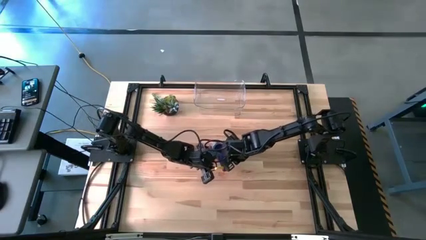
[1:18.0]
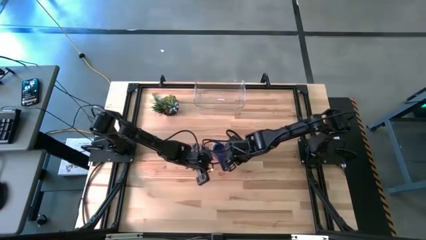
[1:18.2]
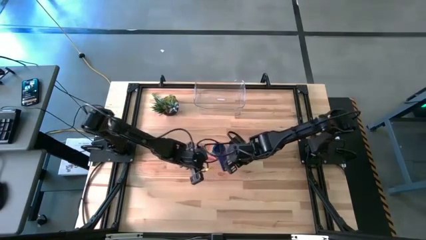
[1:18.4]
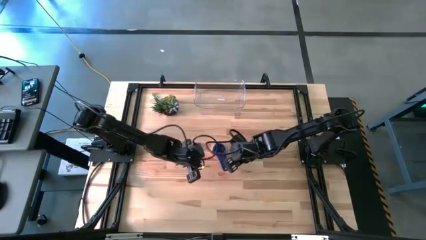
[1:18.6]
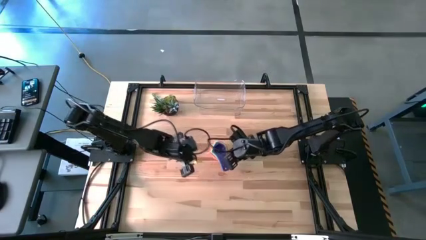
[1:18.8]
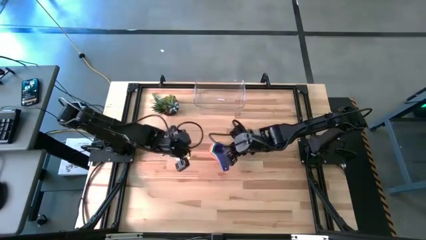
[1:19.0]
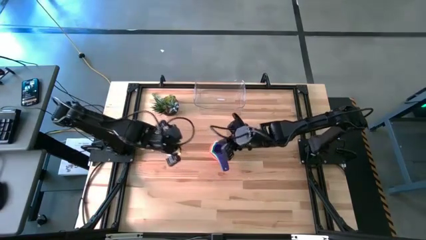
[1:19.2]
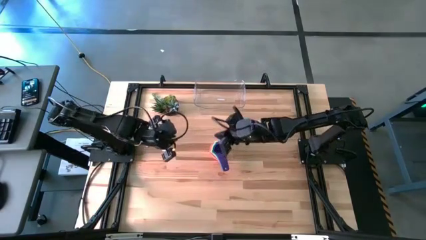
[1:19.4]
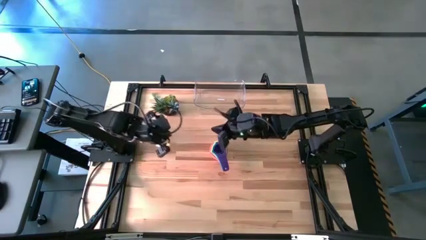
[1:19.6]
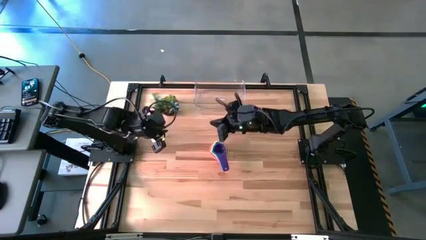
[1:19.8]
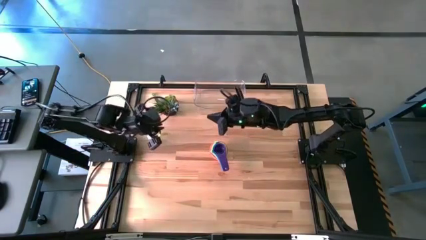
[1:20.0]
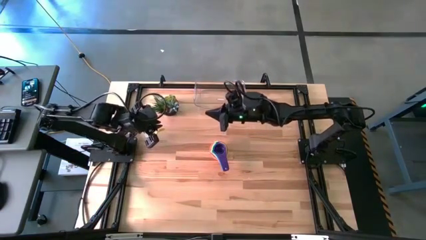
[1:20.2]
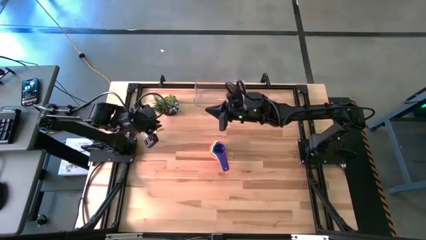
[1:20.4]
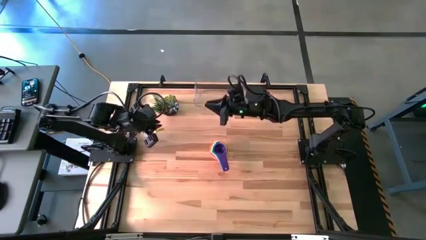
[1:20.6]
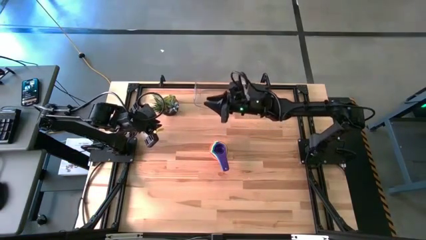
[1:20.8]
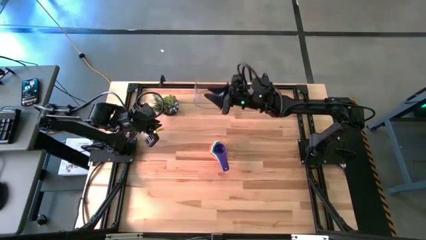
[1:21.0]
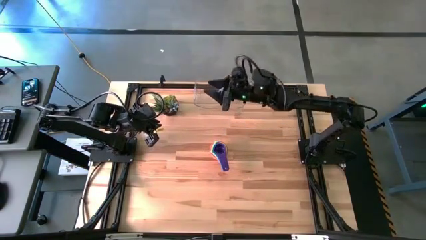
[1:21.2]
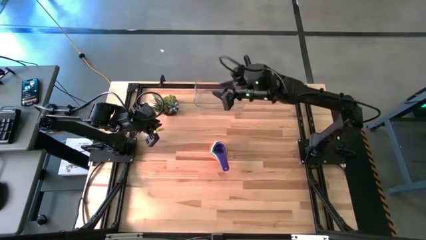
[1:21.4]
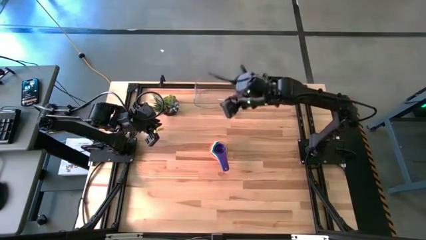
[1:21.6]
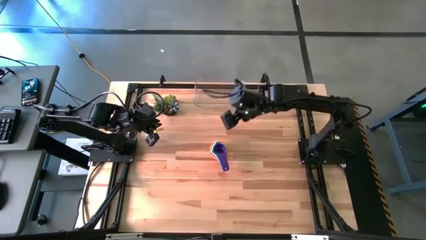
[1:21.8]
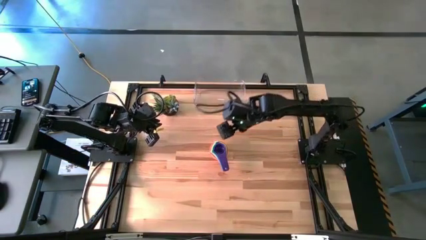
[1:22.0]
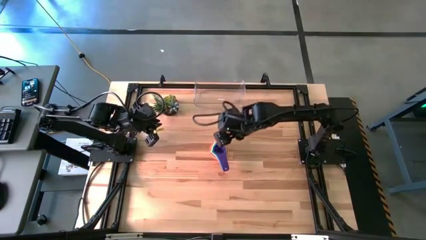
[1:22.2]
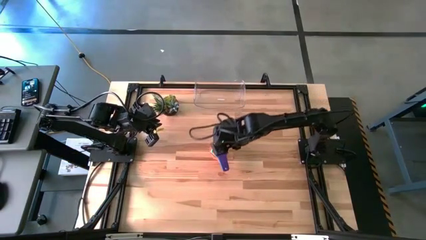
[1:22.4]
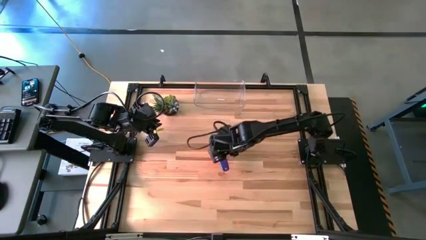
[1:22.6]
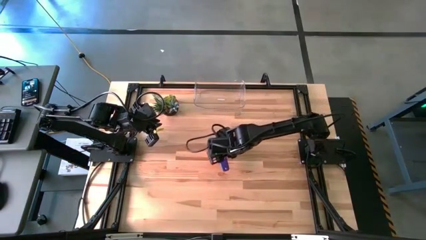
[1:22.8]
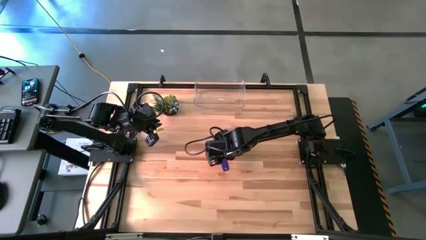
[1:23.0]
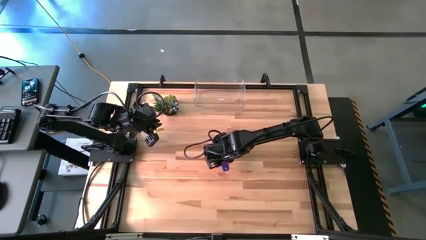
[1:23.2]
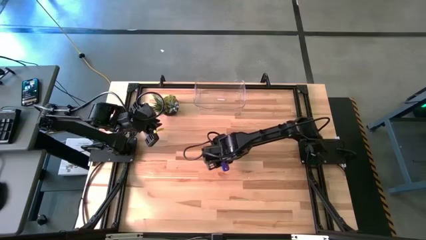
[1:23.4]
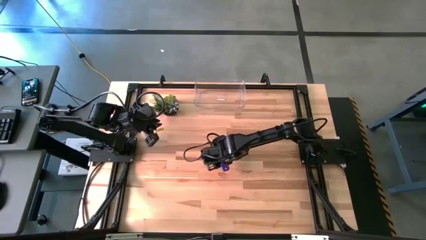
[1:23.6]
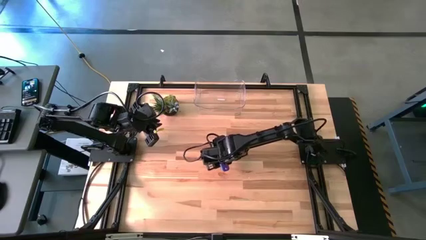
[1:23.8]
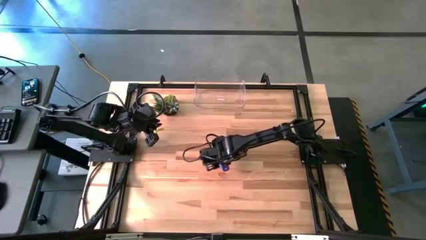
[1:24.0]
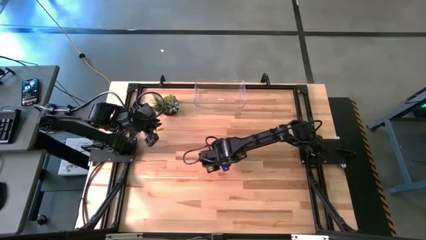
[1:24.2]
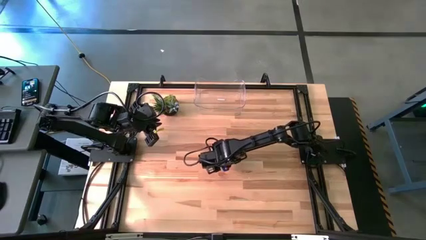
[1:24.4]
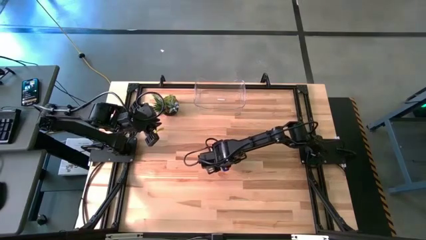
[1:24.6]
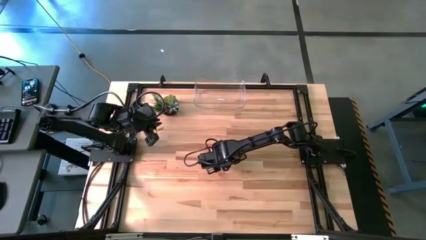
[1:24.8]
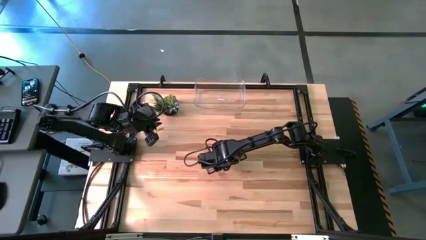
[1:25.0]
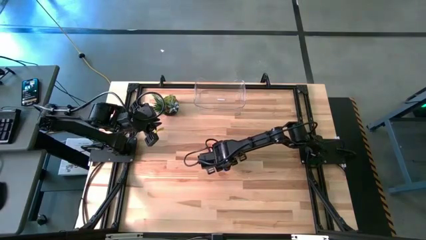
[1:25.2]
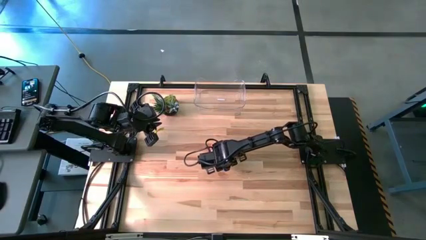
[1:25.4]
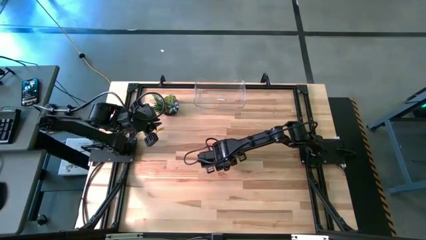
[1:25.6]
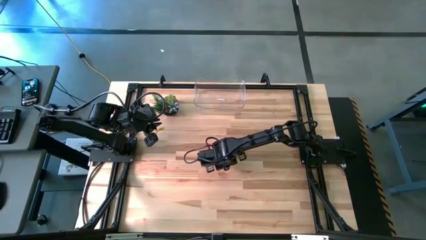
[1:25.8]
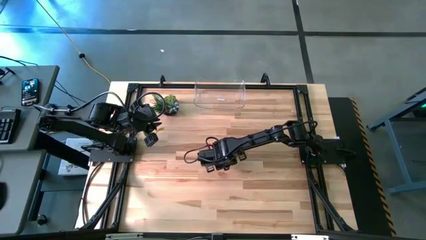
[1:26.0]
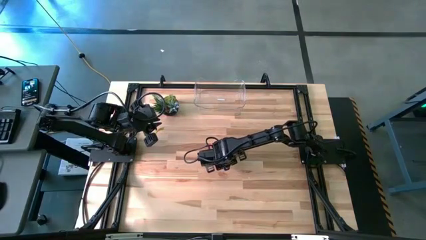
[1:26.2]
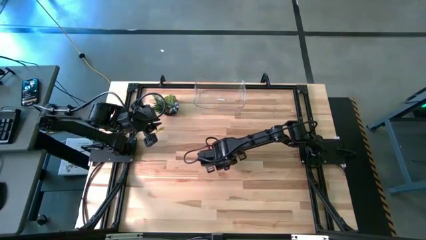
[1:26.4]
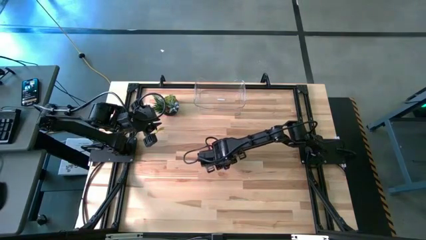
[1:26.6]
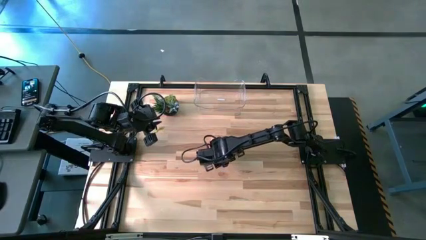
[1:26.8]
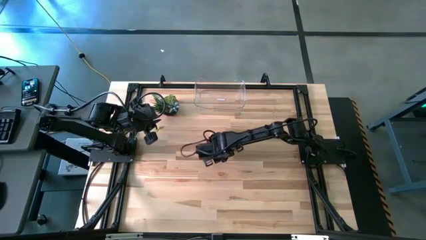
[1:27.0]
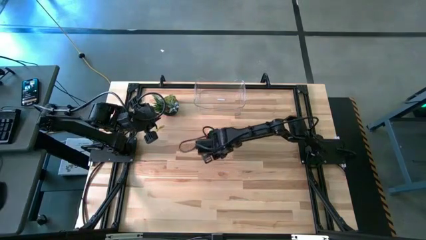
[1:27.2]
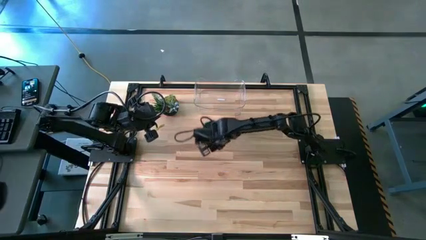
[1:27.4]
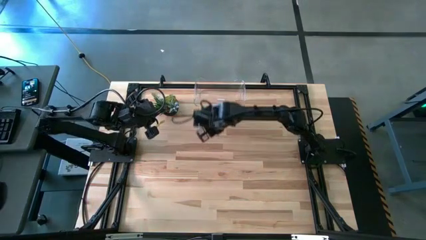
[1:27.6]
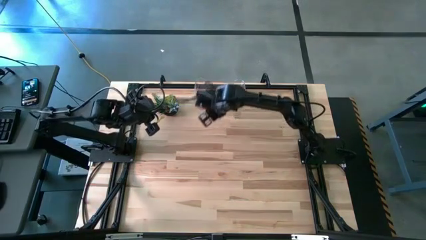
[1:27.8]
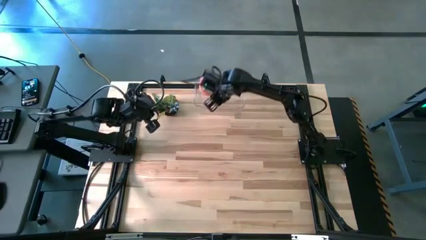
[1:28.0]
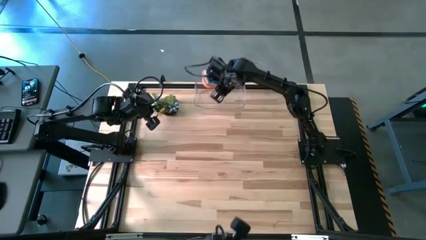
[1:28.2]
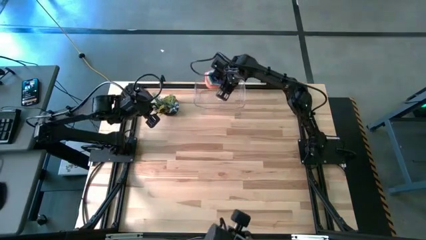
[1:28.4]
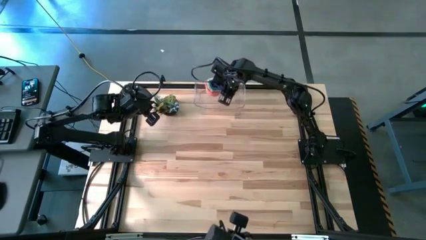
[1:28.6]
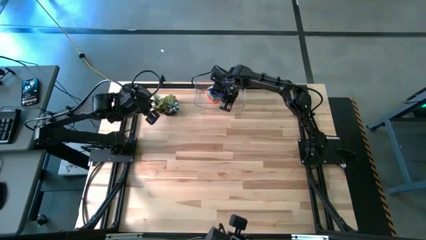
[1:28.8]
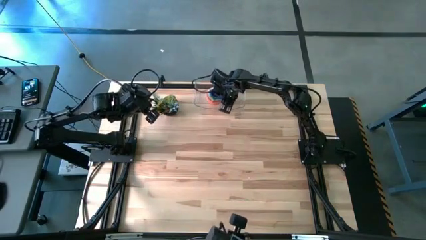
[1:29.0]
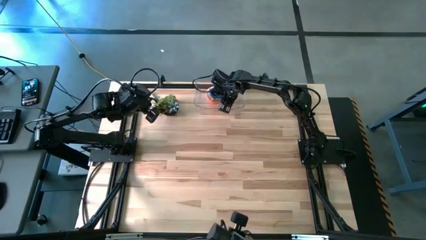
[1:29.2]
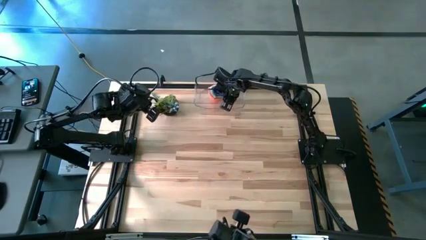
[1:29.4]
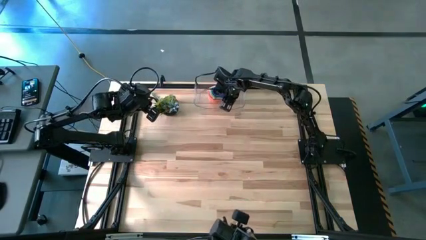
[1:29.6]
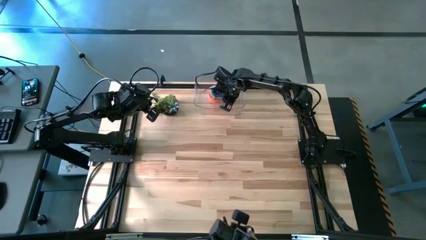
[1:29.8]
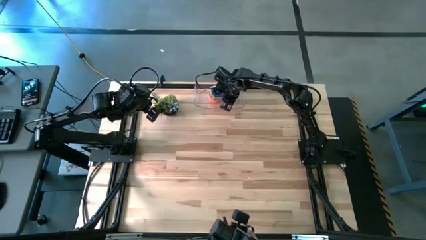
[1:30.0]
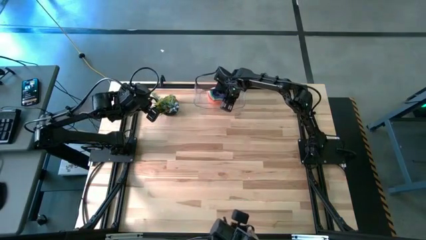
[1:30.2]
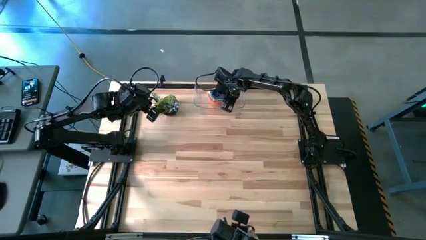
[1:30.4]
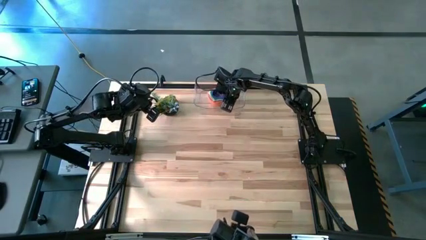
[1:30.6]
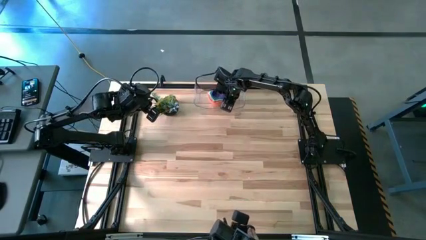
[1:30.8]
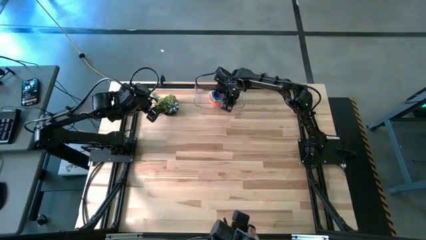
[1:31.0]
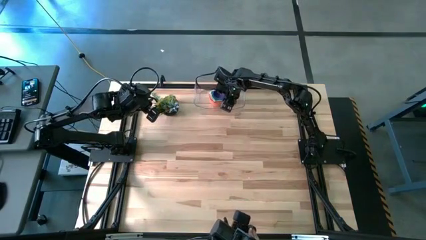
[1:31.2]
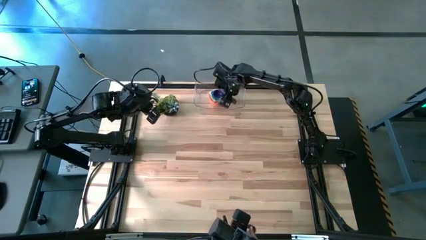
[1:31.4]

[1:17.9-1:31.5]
Task: Nest measuring cups in basket
Put the stacked measuring cups into the transparent bin
